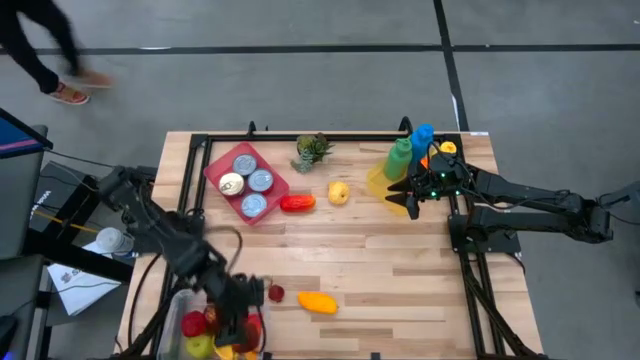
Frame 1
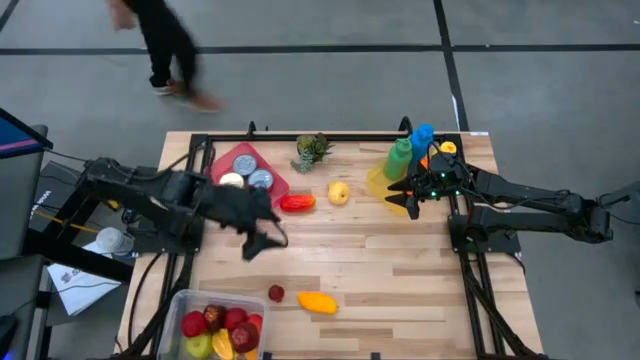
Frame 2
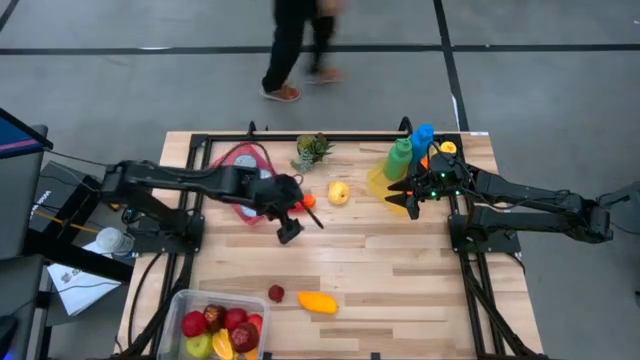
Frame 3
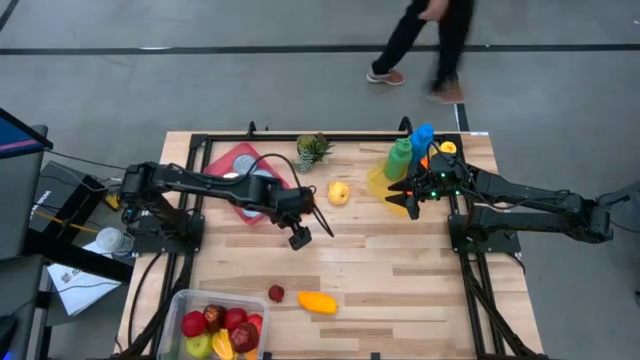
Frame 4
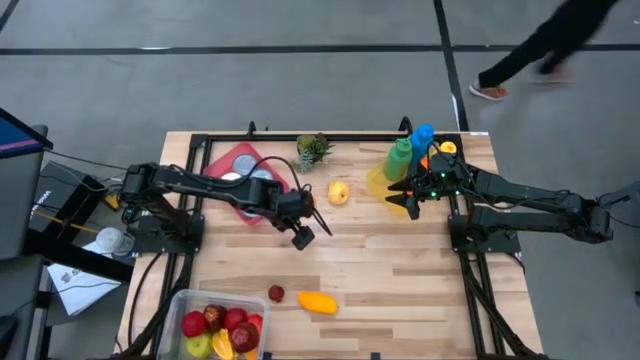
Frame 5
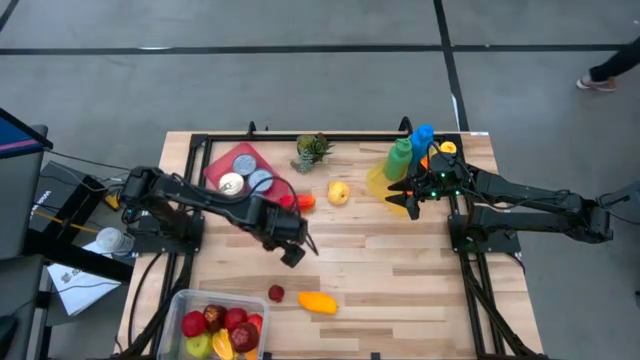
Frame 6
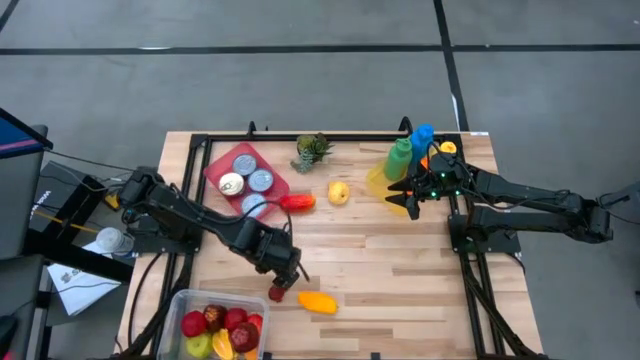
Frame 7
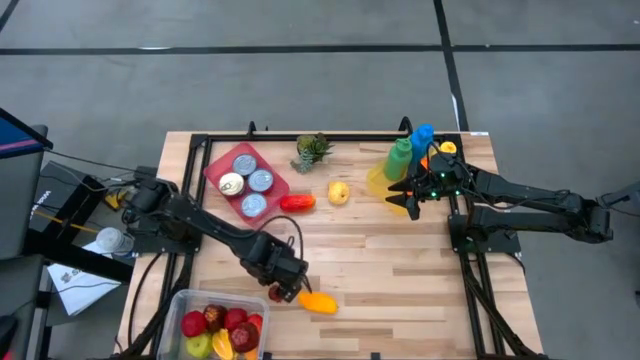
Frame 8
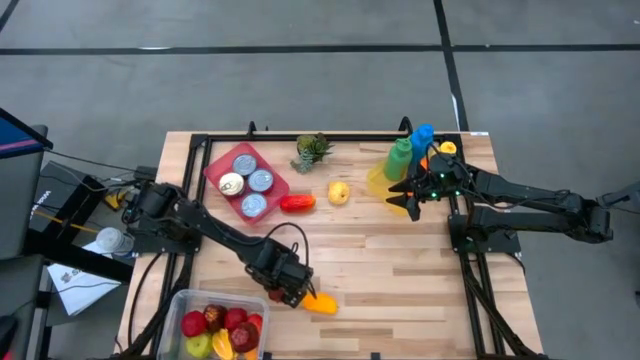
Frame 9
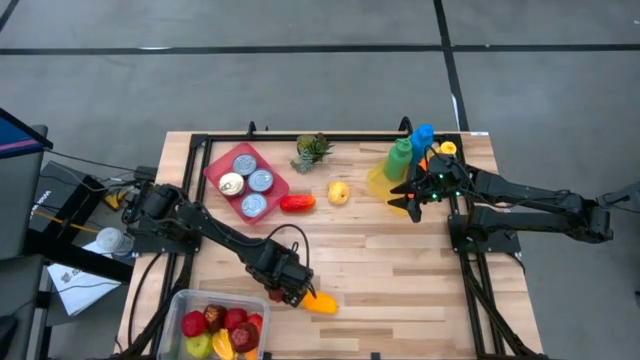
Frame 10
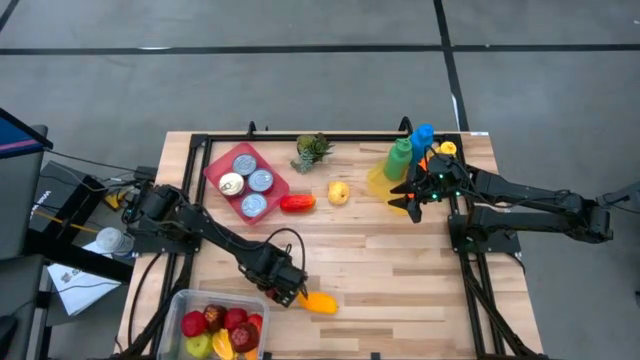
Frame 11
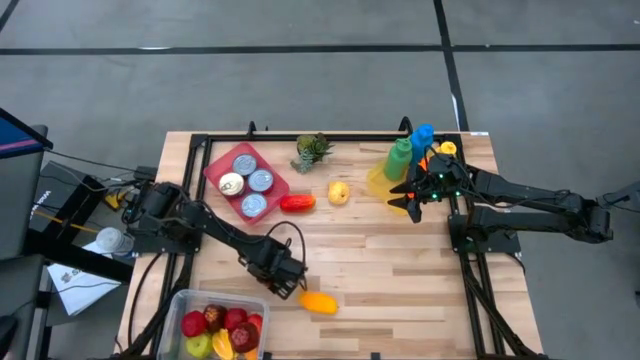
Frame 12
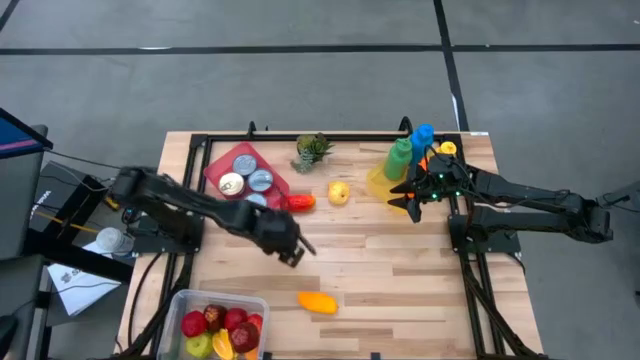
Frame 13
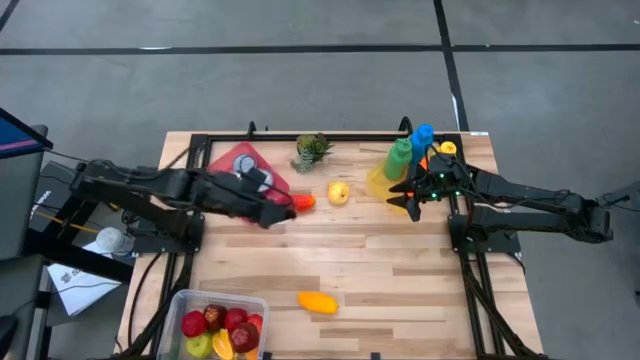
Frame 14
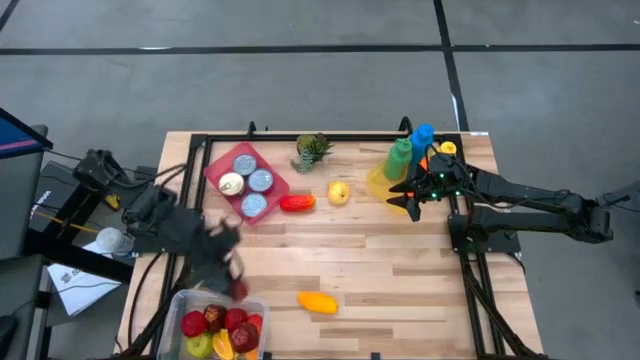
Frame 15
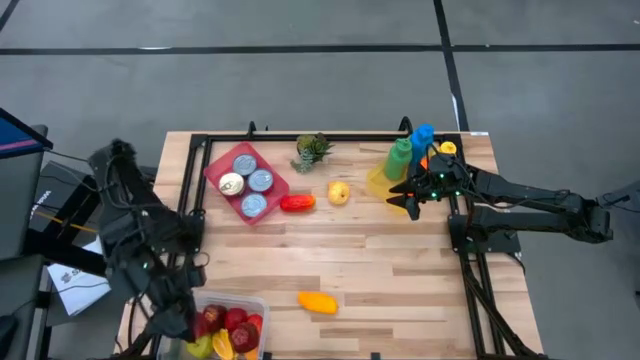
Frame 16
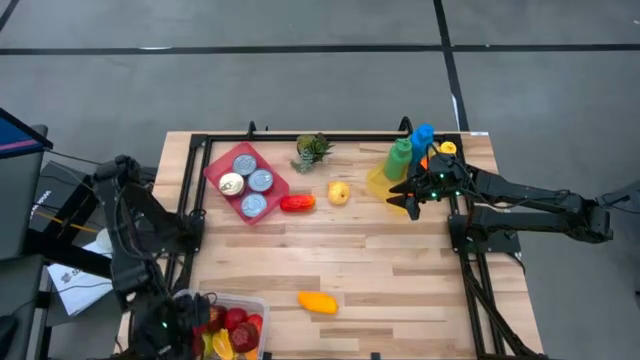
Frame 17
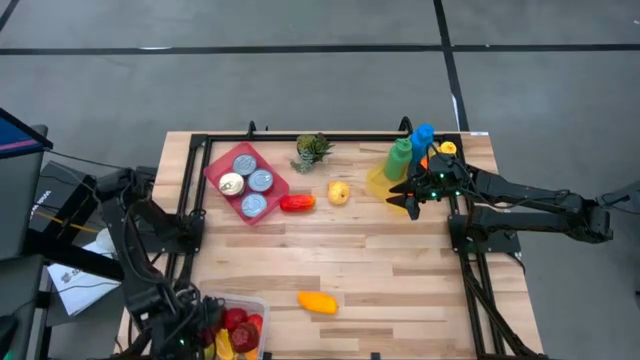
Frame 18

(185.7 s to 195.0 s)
Task: Pick & Place Food Item
Put the red pomegranate into the transparent bin

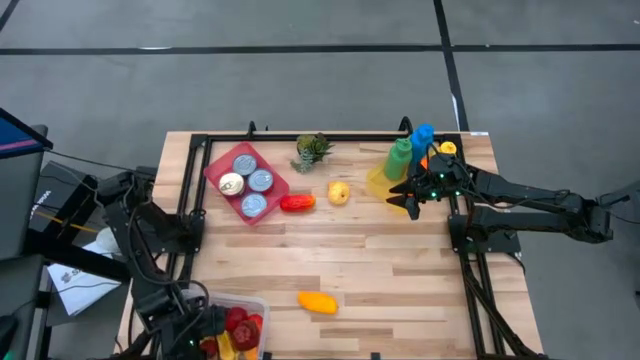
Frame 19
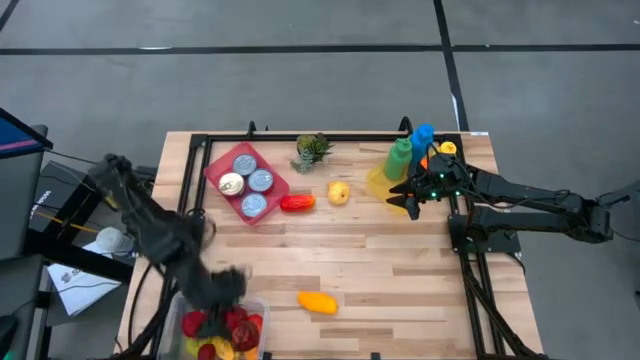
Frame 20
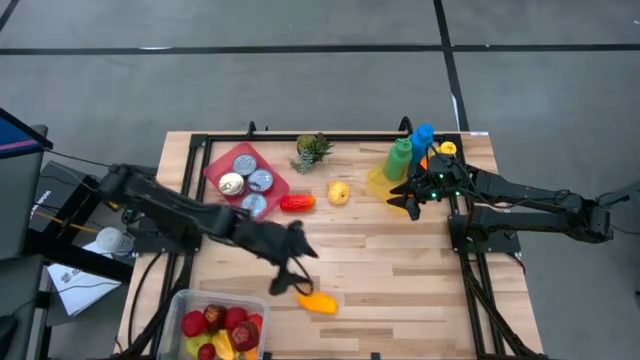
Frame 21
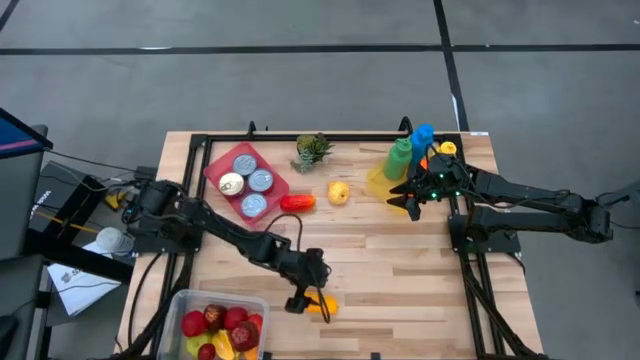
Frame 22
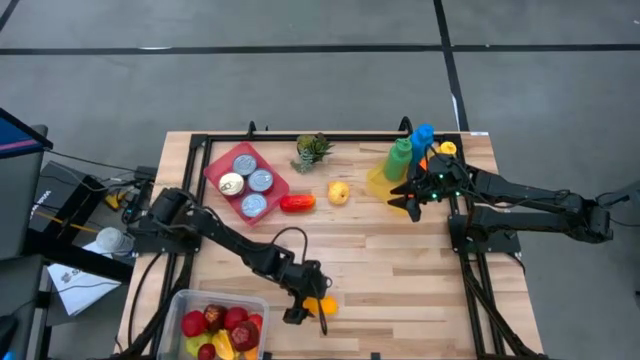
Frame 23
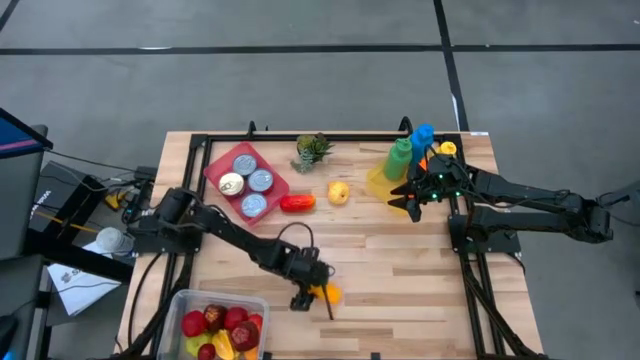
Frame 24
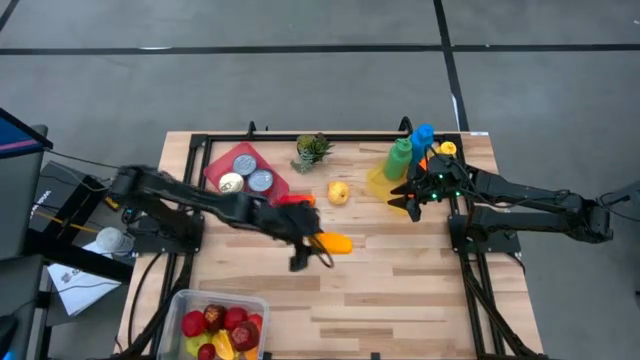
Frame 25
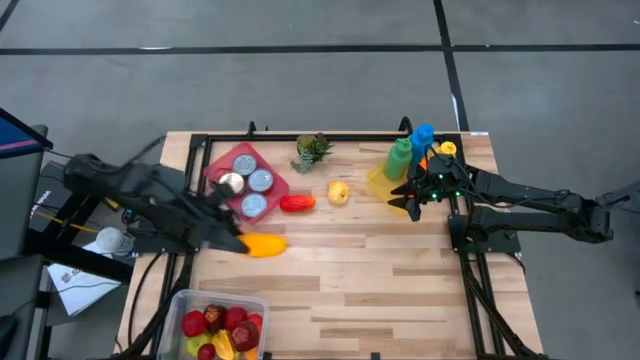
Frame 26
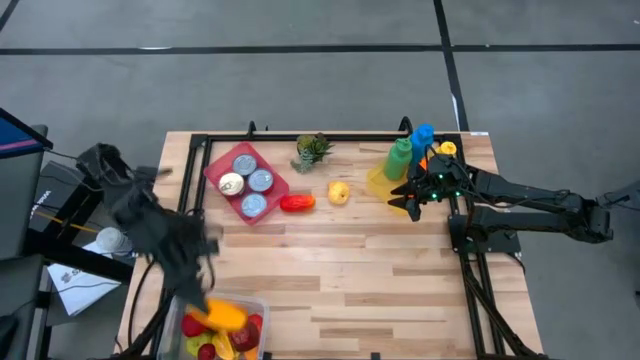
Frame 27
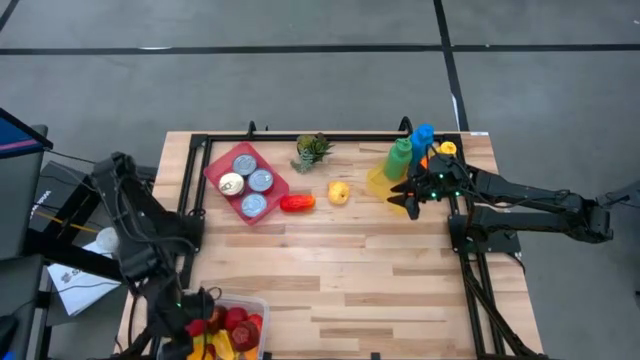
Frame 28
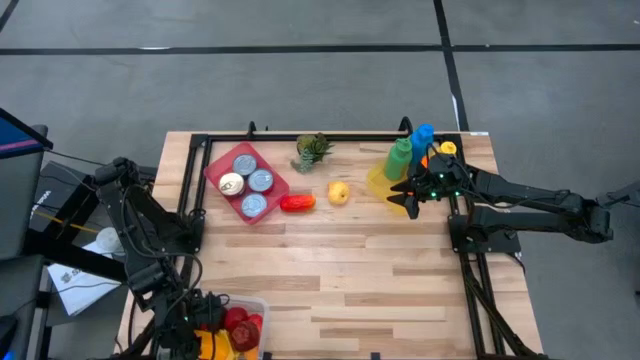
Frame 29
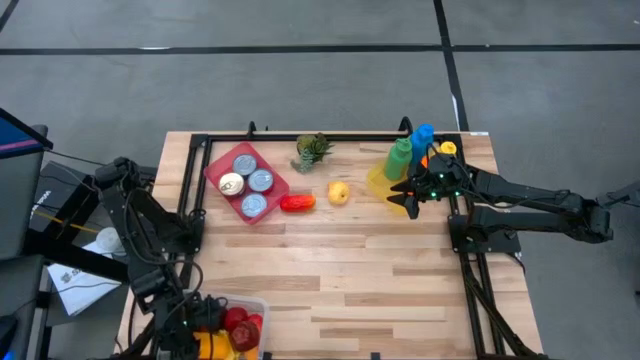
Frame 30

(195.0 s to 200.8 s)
Put the yellow mango into the transparent bin

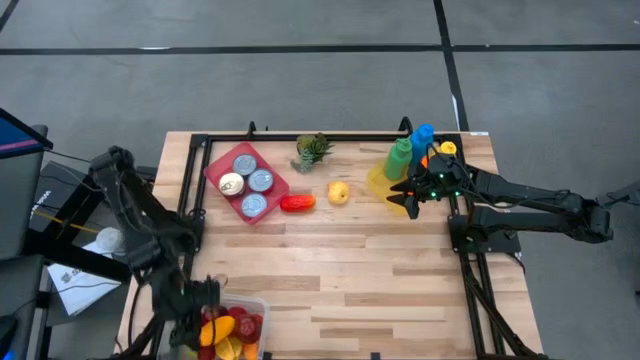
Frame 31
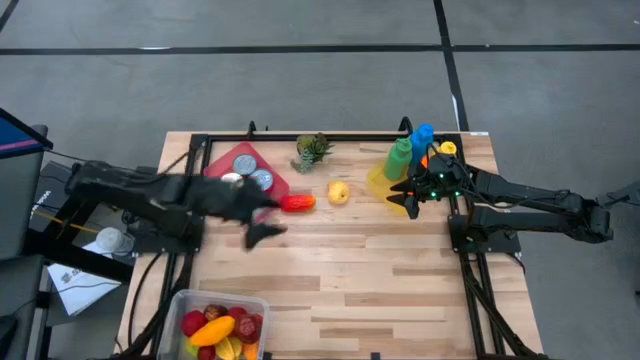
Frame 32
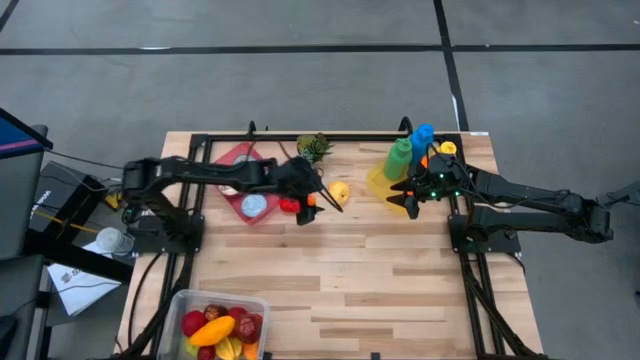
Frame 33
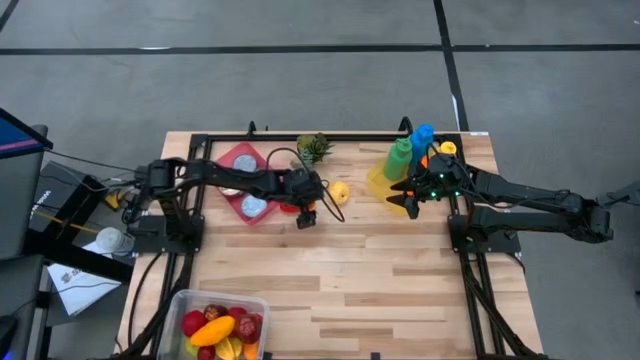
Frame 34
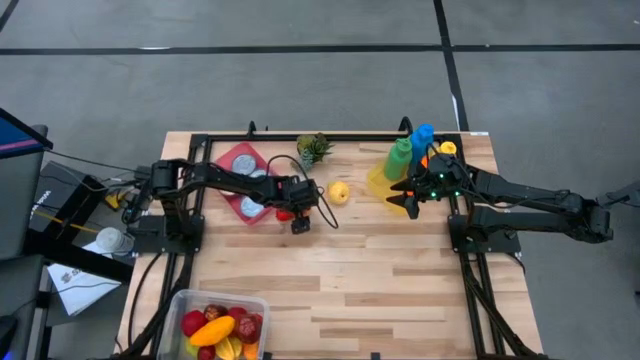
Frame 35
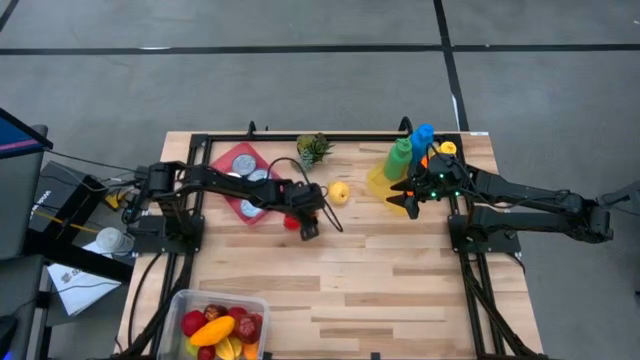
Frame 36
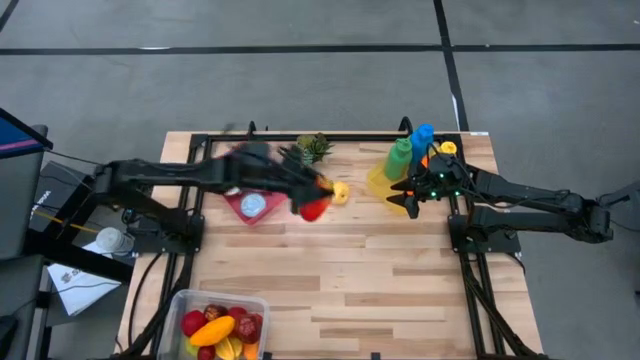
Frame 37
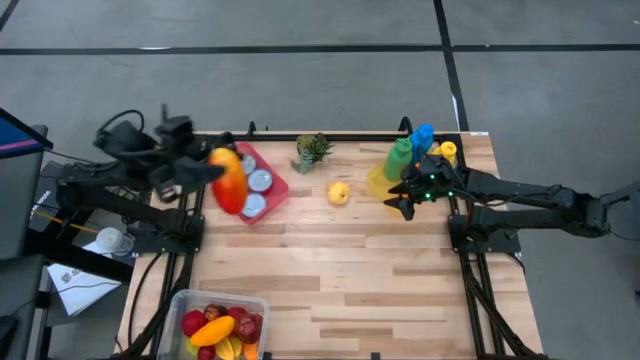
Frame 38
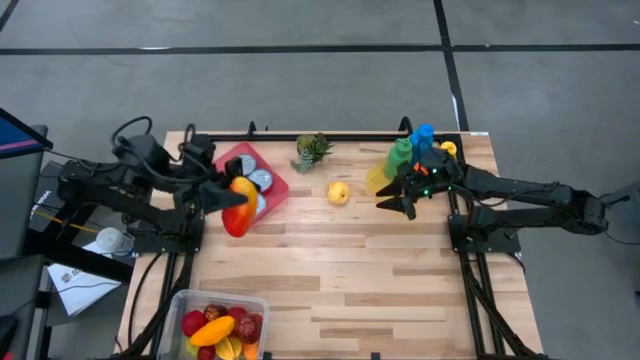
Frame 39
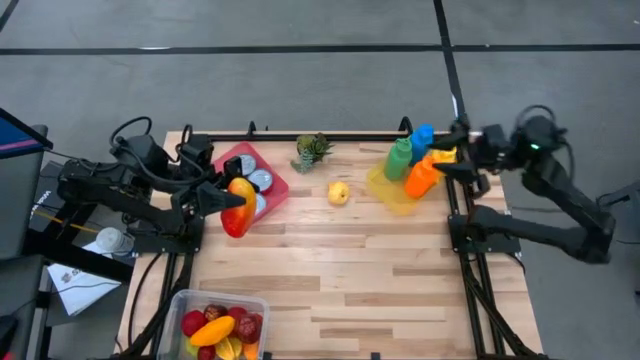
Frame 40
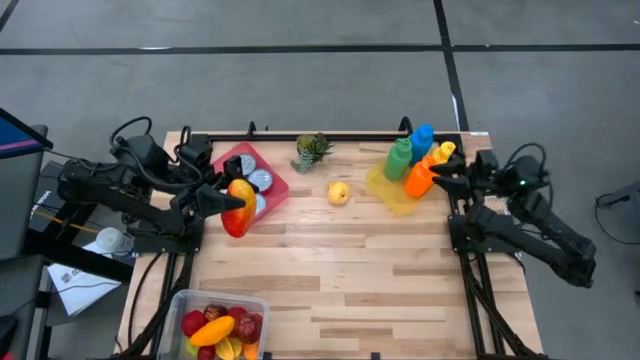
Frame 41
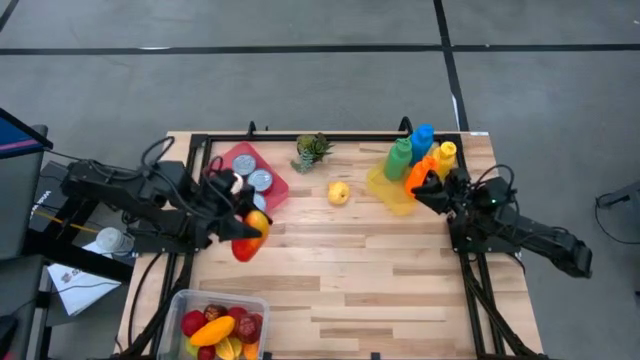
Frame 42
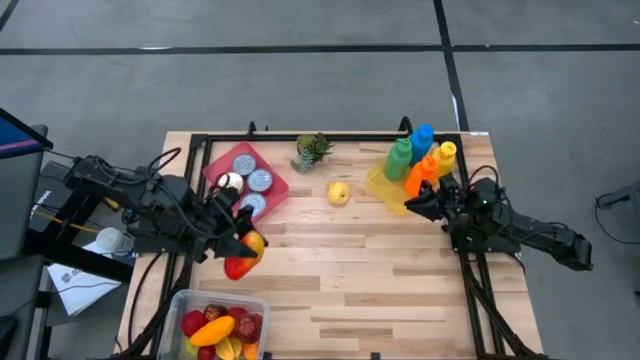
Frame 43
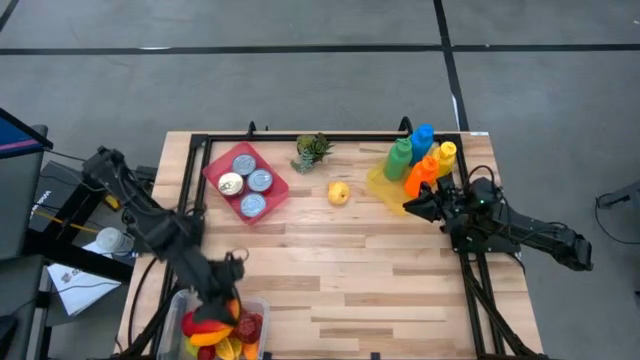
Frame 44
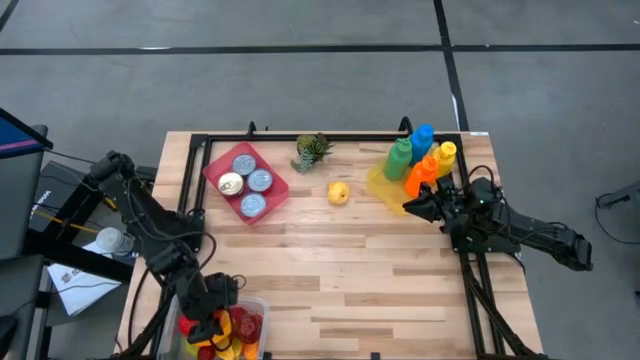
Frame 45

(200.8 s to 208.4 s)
Put the red mango into the transparent bin
